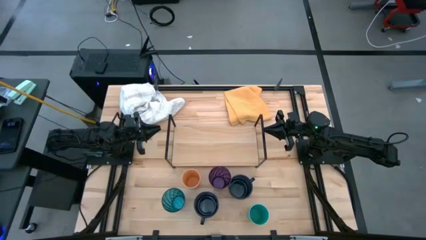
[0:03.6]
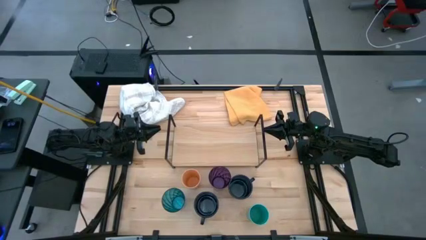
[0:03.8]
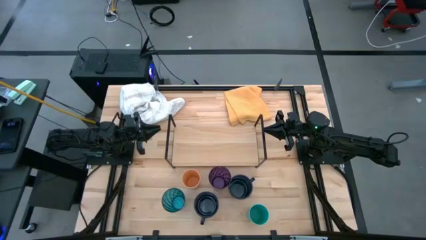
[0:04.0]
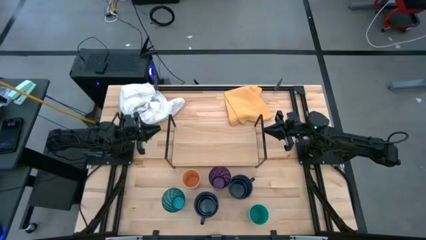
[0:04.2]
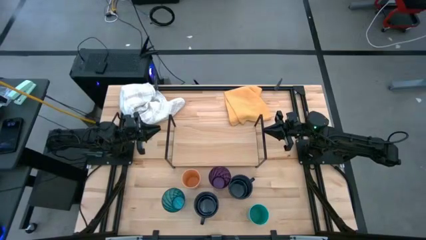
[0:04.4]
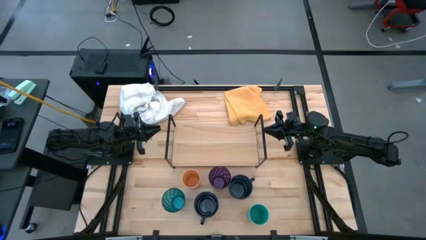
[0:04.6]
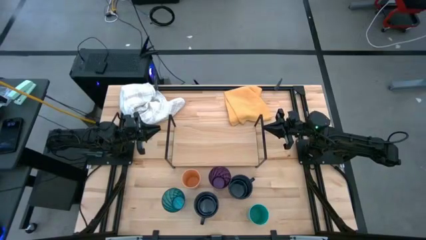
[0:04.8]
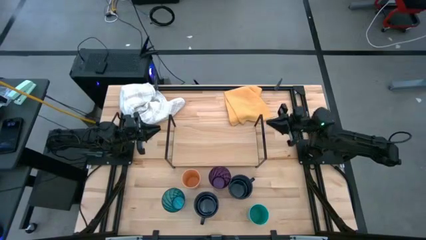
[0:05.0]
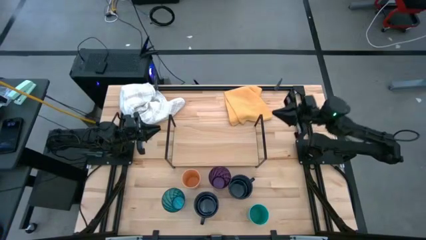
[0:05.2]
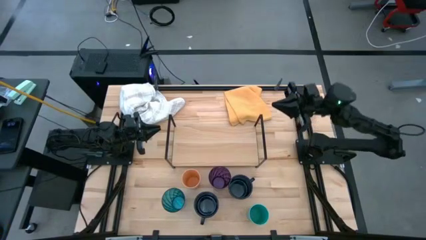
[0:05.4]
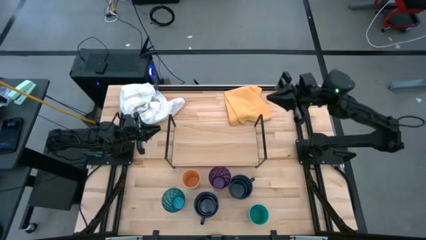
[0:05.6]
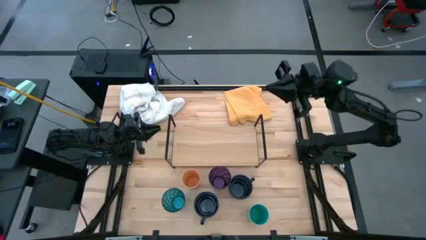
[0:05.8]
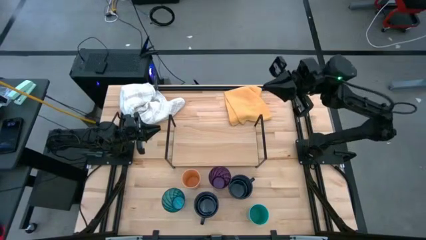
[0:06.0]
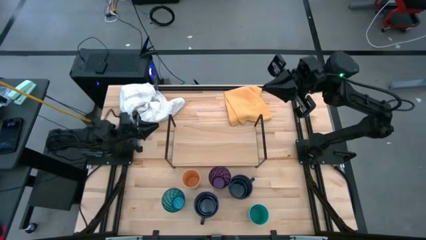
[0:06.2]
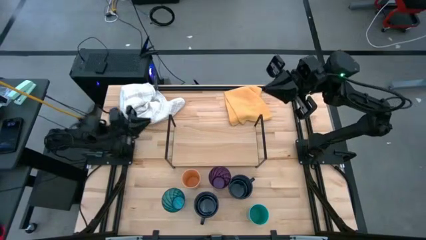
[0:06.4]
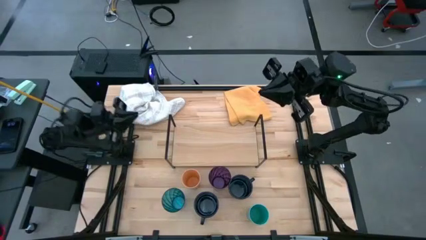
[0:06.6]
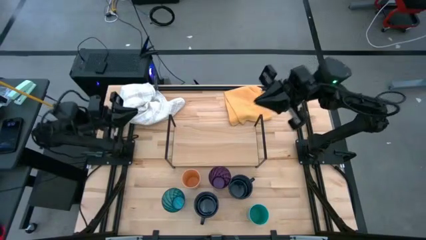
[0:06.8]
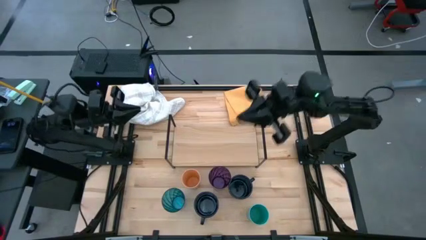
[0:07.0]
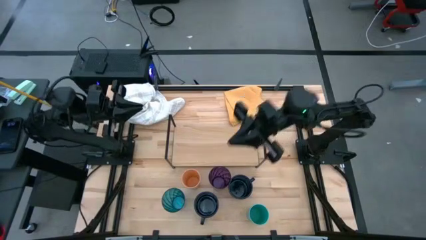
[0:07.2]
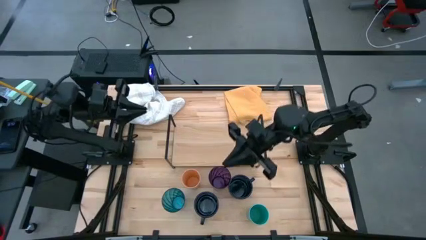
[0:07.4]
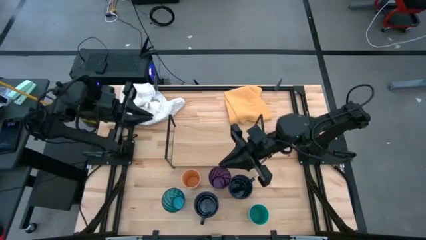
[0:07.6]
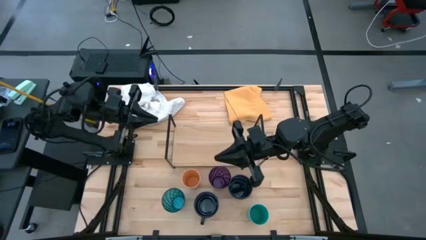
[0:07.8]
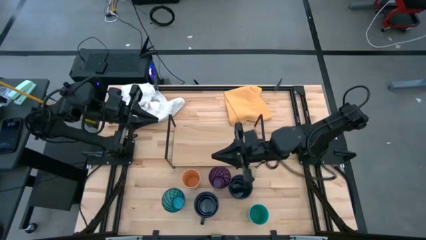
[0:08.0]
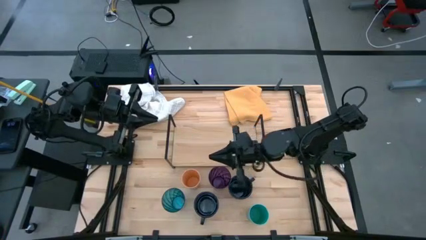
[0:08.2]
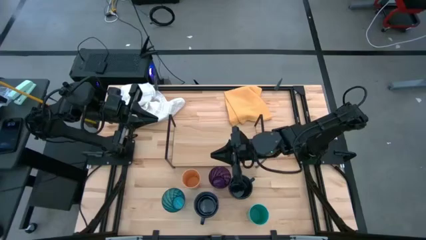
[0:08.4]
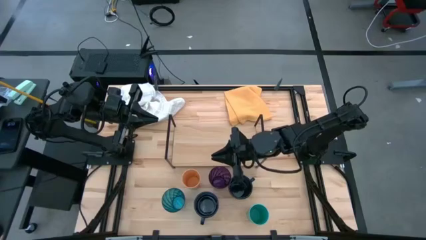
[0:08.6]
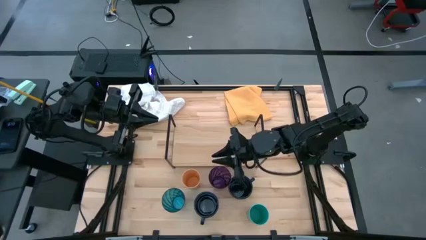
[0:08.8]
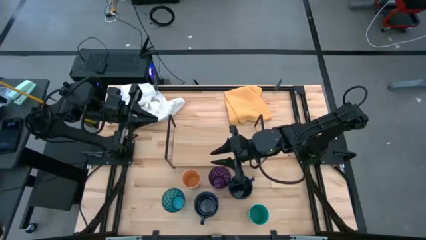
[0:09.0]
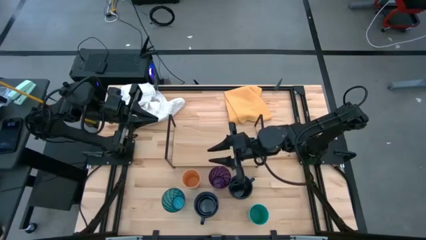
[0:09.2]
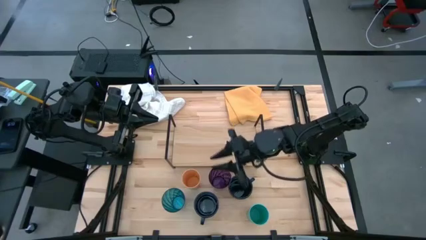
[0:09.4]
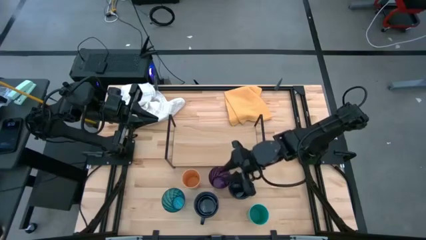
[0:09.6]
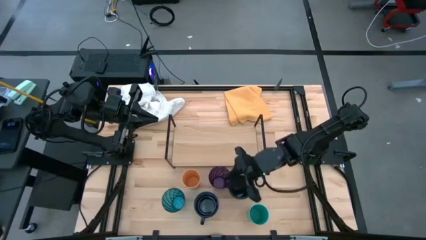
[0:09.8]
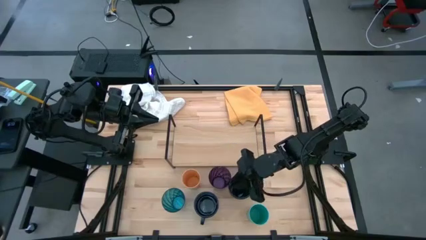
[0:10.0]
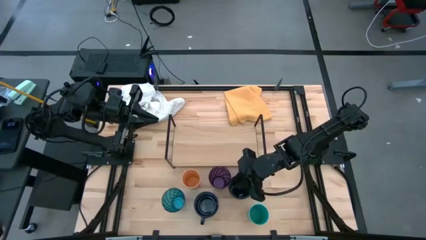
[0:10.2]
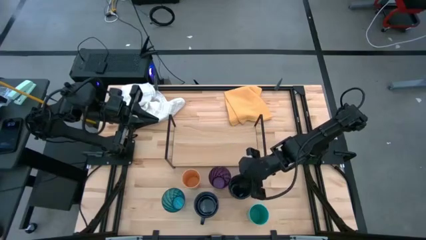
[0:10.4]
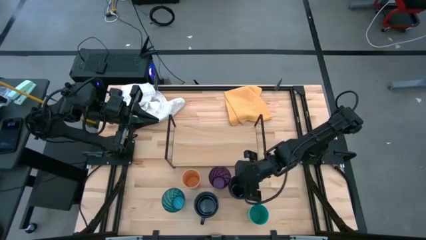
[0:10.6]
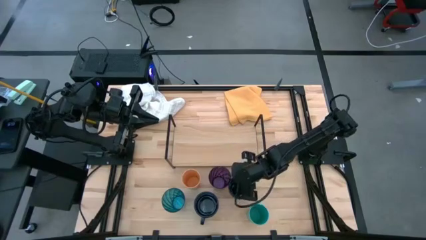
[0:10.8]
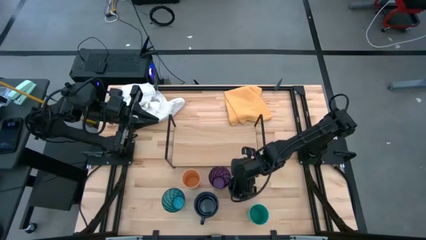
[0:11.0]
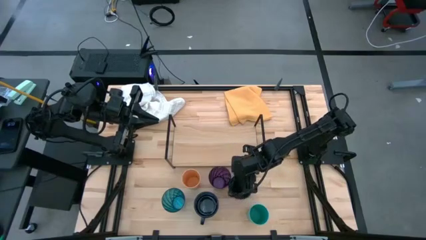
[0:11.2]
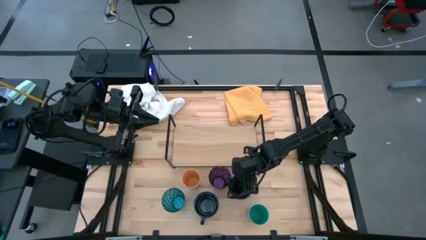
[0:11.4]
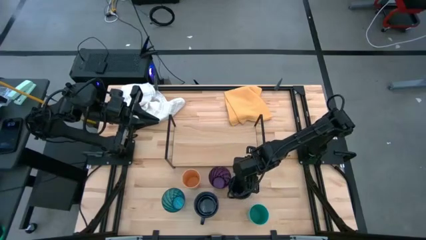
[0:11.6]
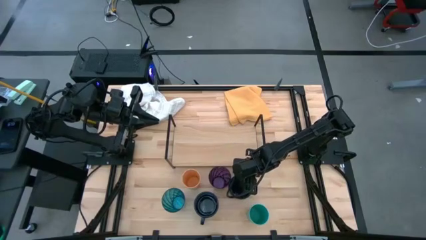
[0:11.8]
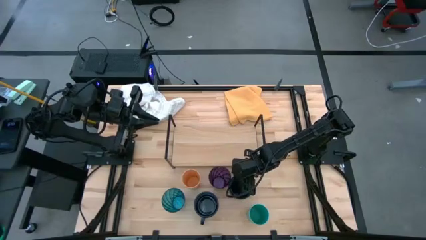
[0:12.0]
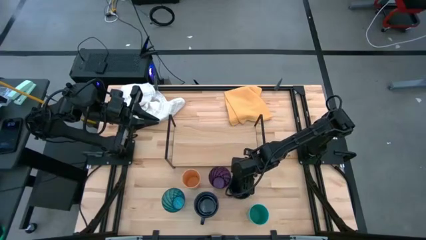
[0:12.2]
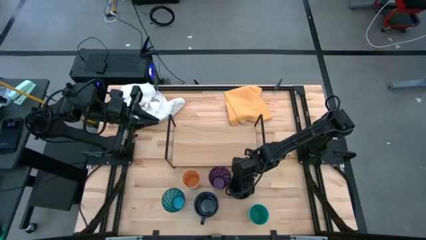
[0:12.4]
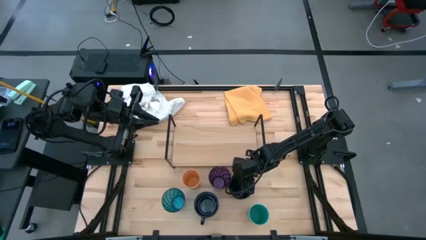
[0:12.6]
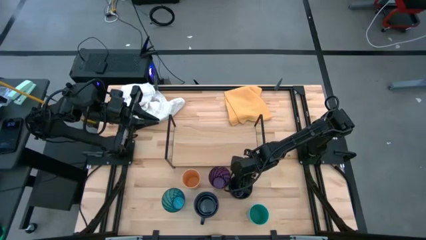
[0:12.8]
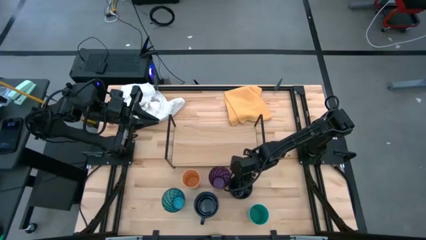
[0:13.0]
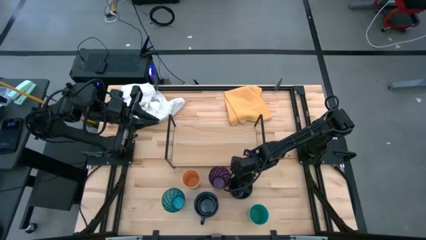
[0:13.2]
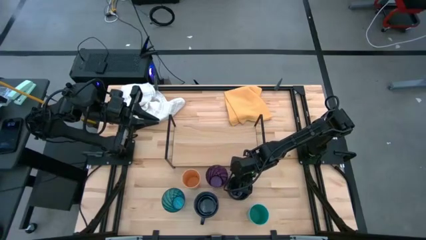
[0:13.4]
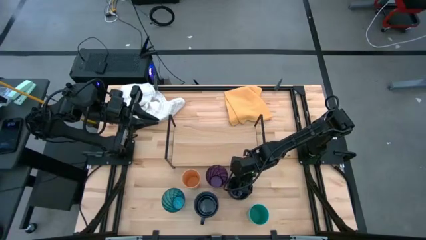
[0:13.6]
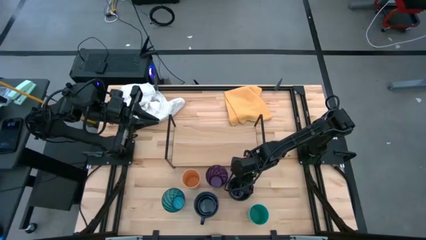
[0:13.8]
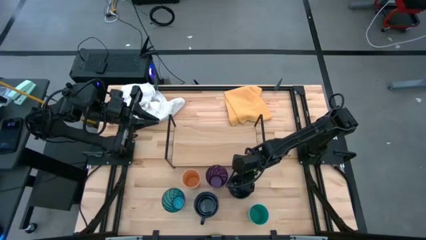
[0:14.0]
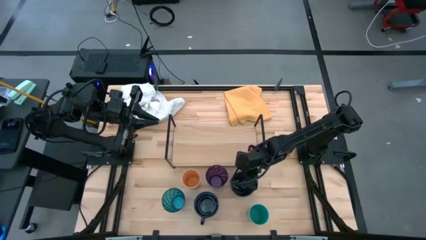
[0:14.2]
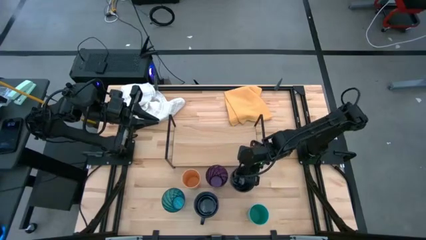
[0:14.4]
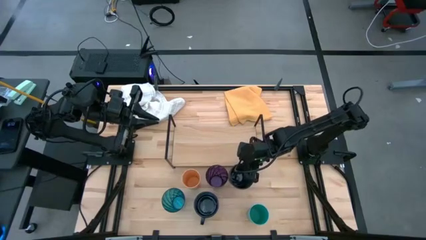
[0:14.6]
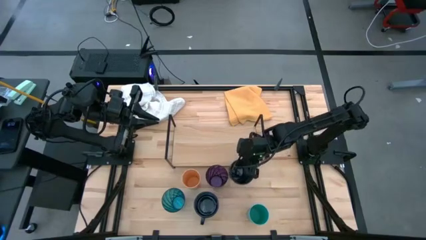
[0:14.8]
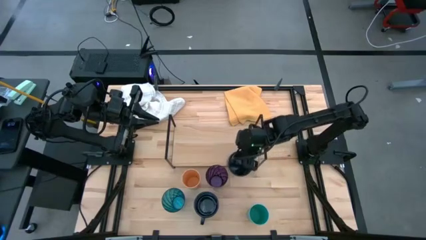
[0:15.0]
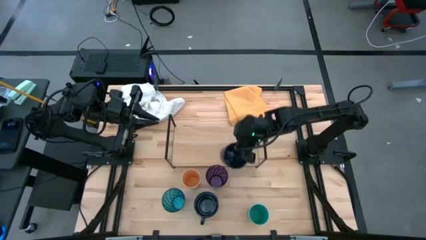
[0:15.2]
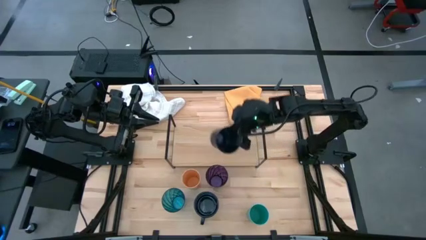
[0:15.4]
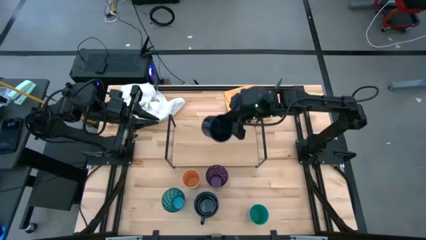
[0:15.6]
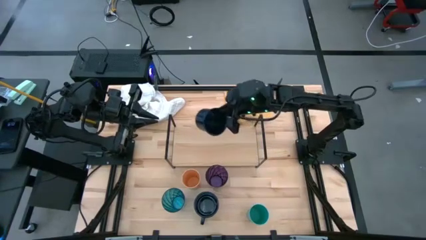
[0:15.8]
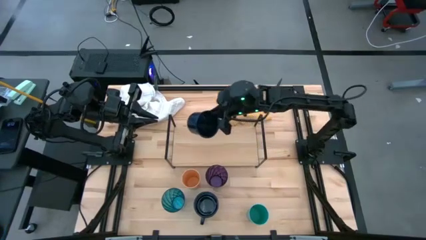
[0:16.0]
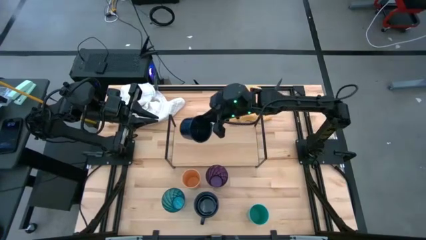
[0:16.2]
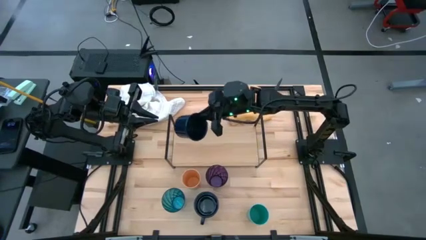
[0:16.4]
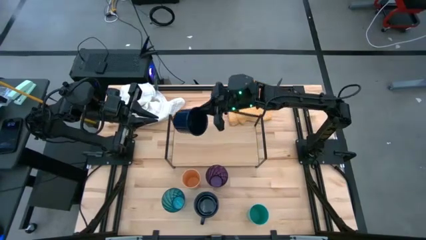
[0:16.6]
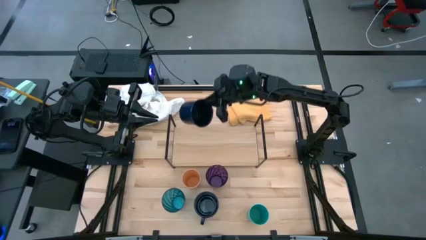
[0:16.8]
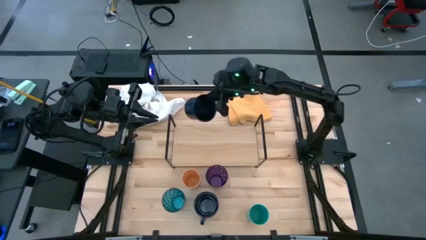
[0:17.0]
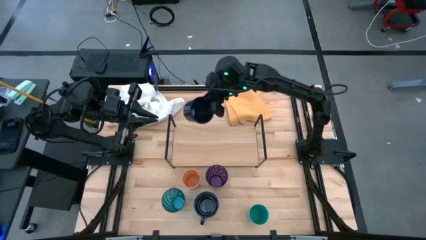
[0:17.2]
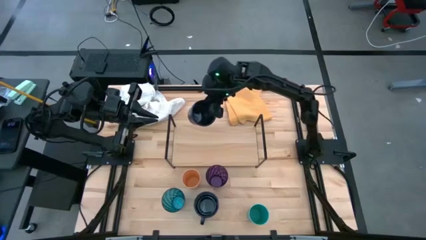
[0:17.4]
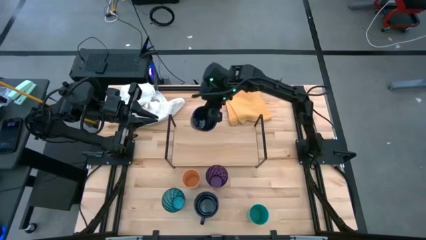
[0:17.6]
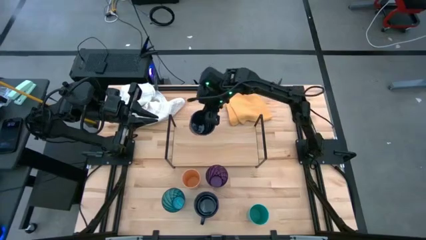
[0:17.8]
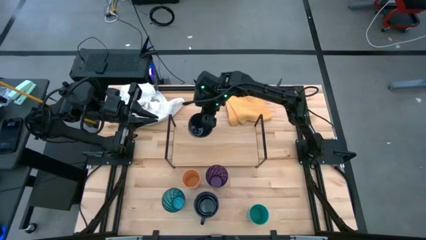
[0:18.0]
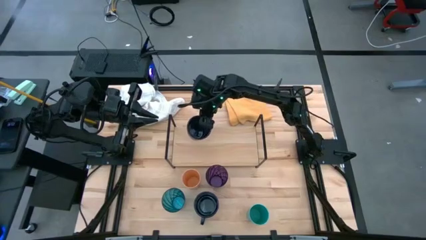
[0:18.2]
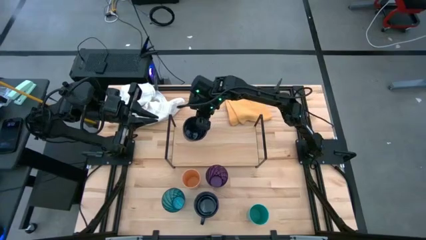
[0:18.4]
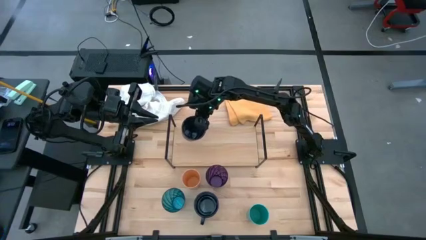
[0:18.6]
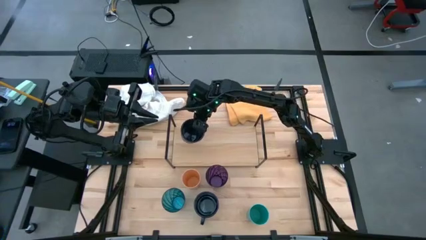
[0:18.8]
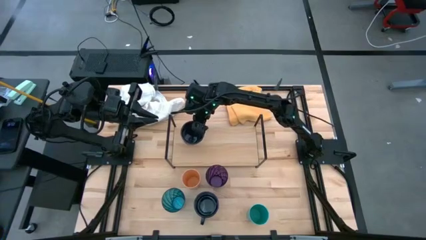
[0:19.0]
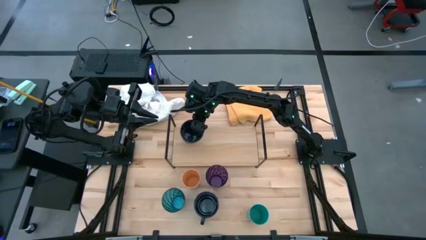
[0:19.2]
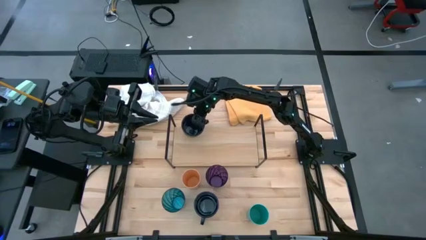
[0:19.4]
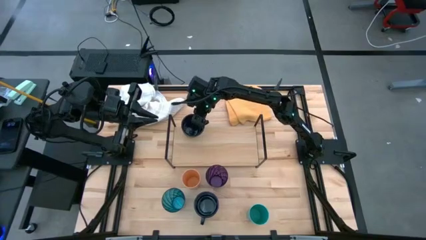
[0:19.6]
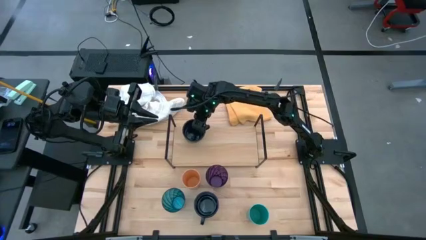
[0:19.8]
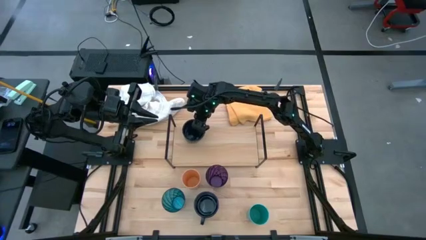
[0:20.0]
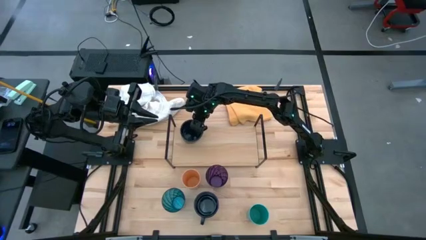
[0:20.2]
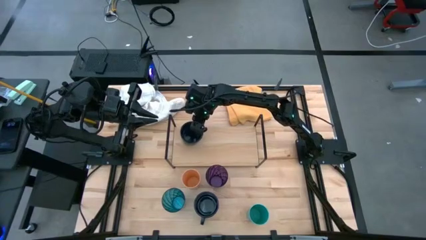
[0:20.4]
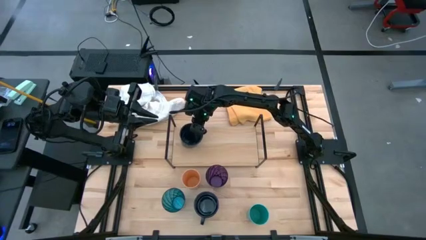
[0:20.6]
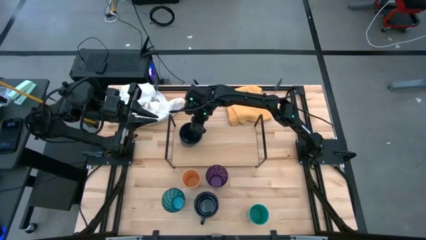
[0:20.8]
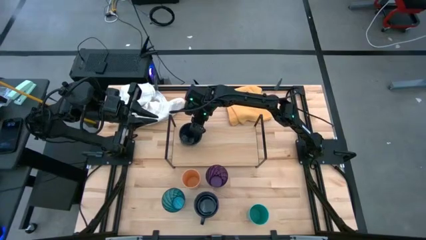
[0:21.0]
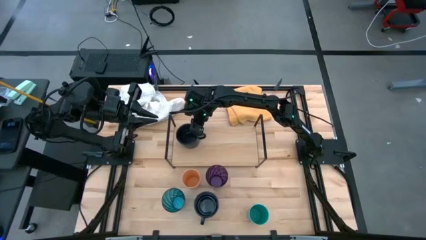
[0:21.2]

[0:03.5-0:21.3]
Task: Stack small to large cups/mugs on shelf
Put the right dark blue mug on the shelf put the green cup on the shelf
